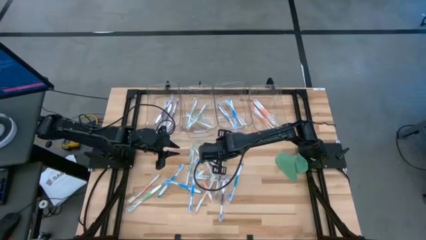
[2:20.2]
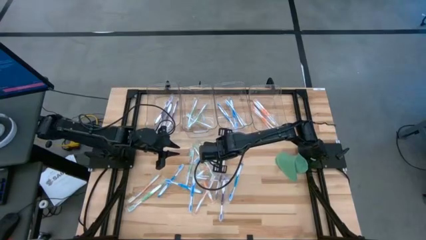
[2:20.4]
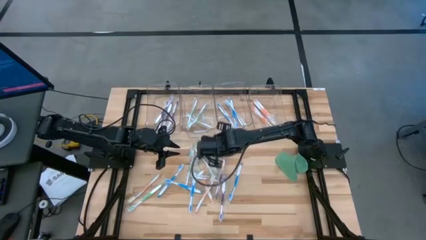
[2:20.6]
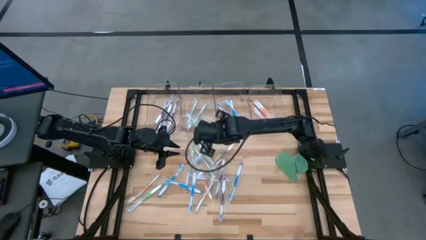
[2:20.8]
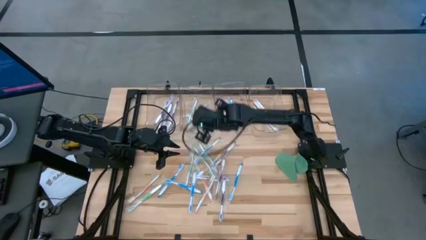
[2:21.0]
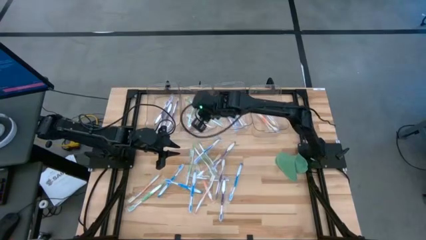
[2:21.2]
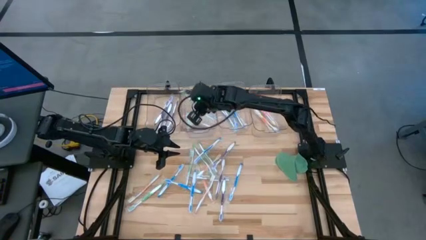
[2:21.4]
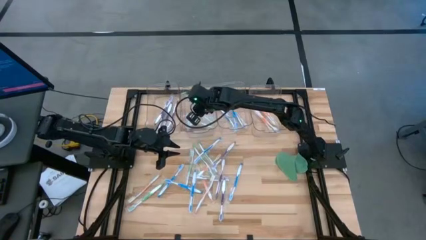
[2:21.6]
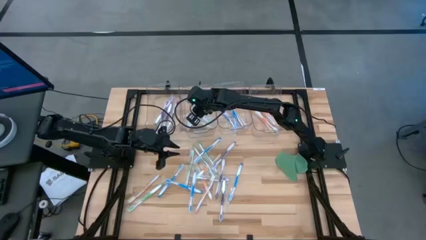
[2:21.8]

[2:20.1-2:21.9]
Task: Pick & Place Toothbrushes
Put the green toothbrush into the middle left transparent bin

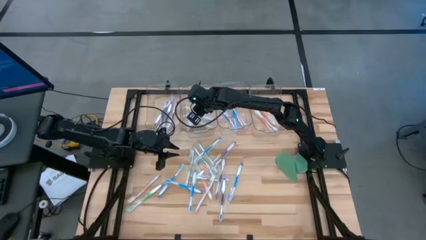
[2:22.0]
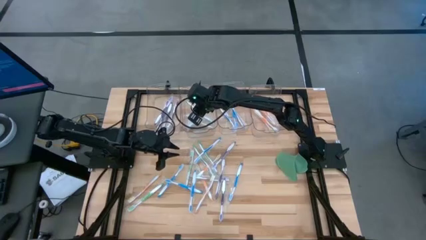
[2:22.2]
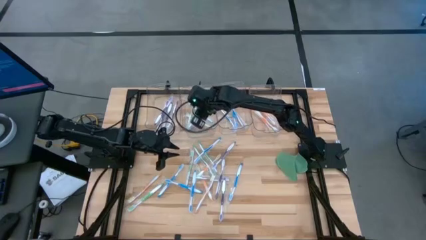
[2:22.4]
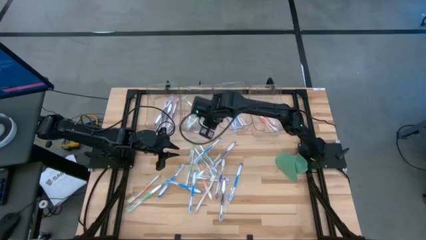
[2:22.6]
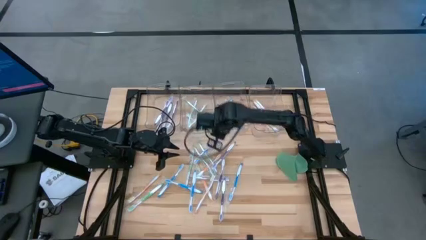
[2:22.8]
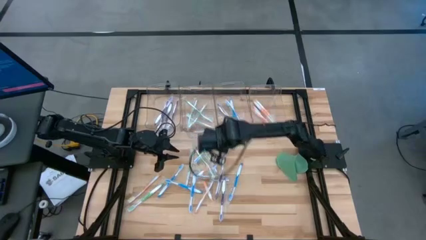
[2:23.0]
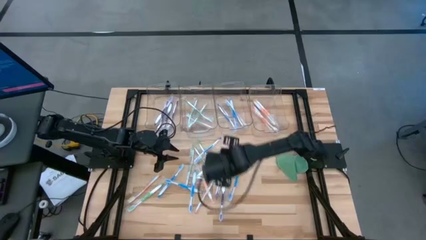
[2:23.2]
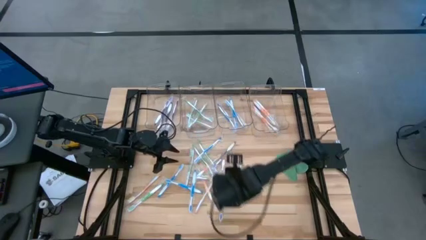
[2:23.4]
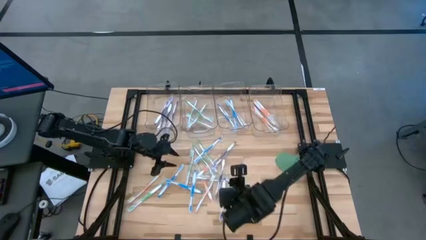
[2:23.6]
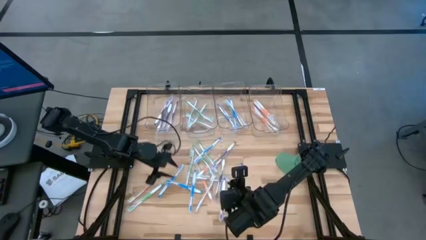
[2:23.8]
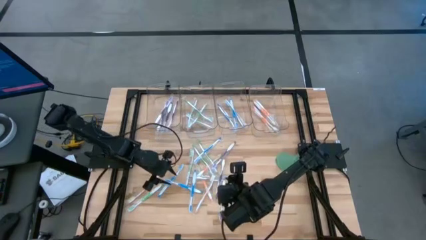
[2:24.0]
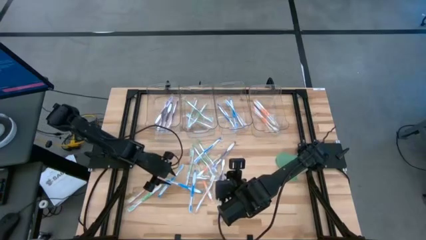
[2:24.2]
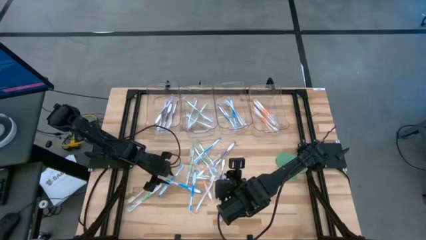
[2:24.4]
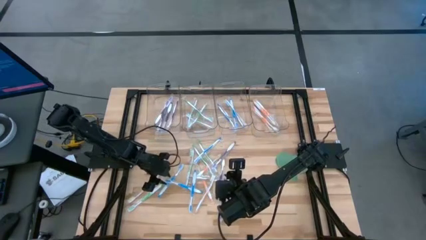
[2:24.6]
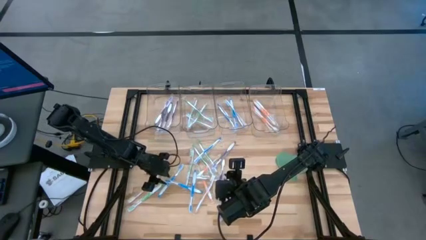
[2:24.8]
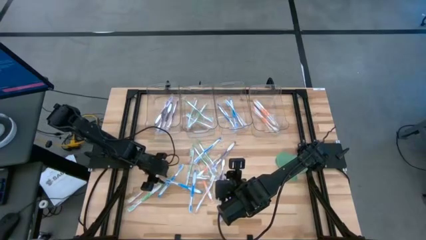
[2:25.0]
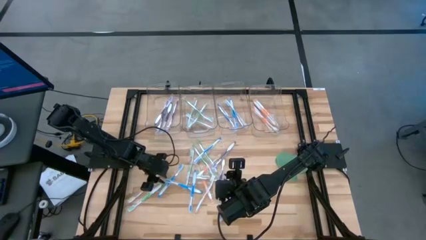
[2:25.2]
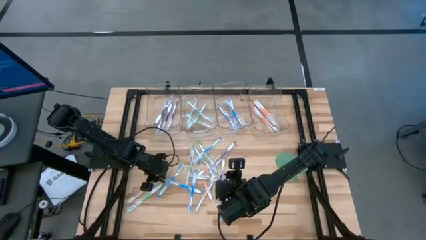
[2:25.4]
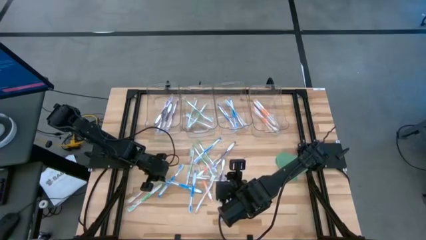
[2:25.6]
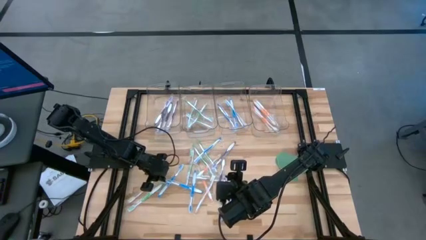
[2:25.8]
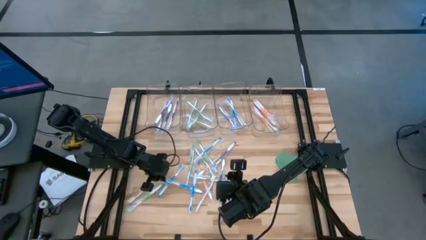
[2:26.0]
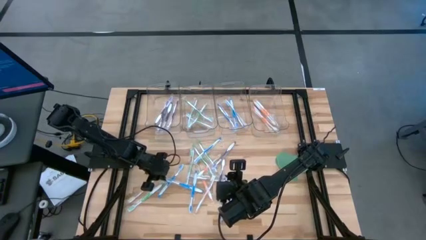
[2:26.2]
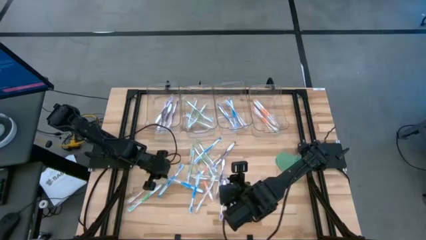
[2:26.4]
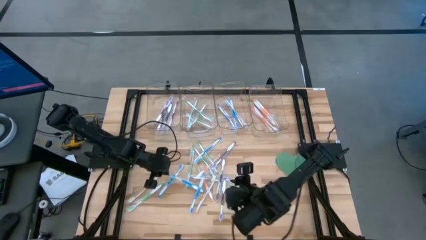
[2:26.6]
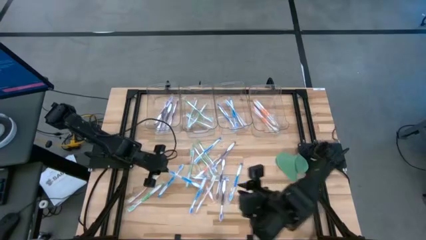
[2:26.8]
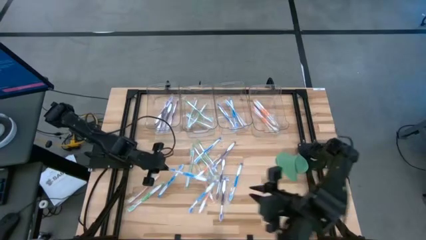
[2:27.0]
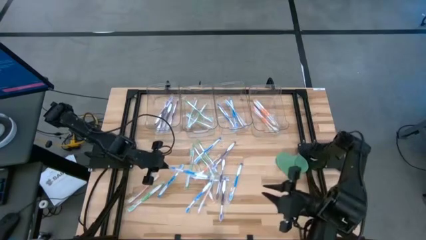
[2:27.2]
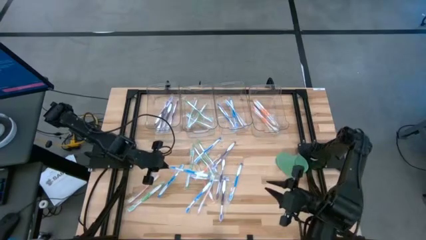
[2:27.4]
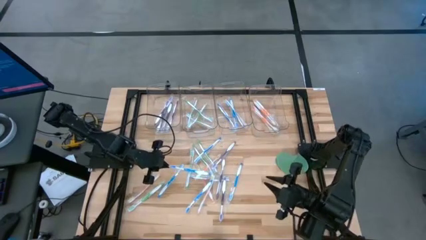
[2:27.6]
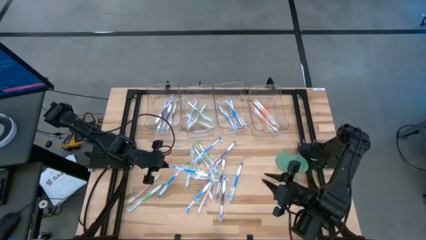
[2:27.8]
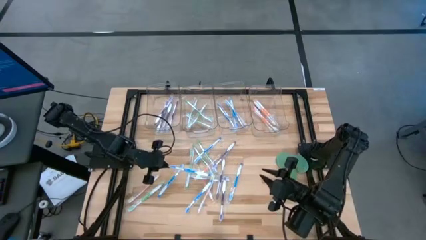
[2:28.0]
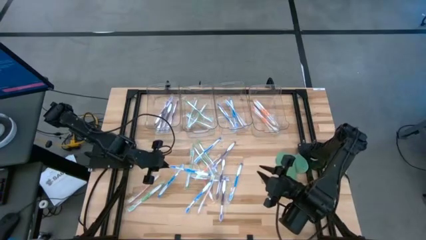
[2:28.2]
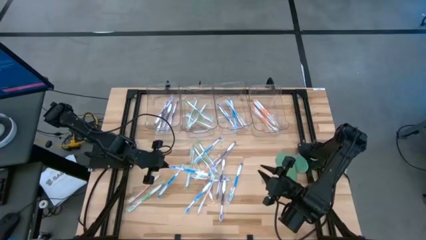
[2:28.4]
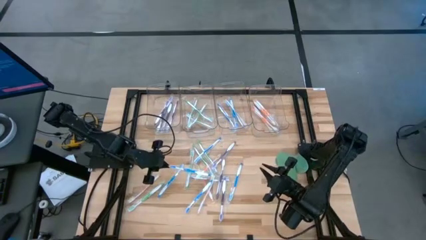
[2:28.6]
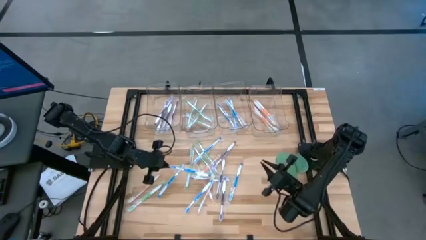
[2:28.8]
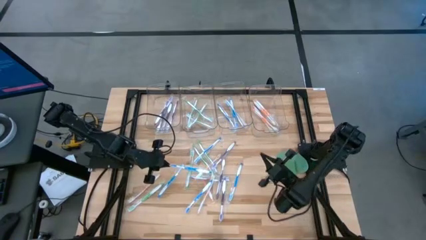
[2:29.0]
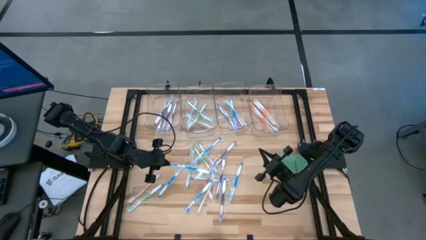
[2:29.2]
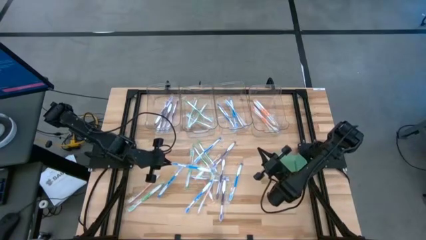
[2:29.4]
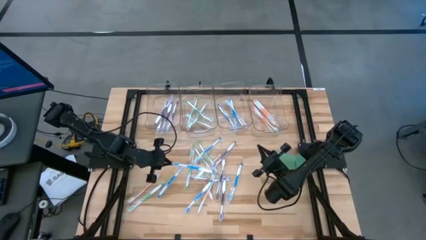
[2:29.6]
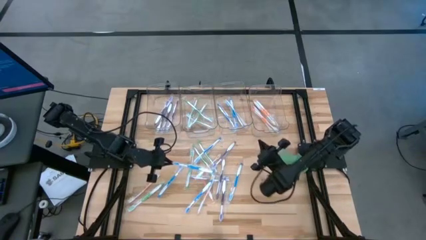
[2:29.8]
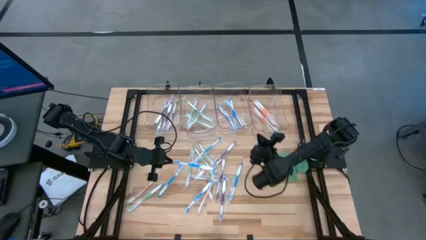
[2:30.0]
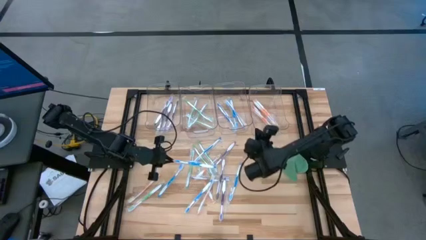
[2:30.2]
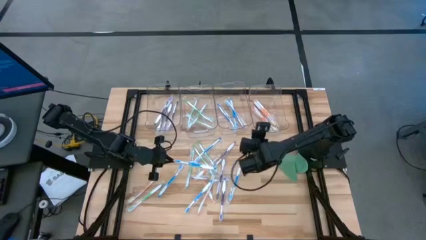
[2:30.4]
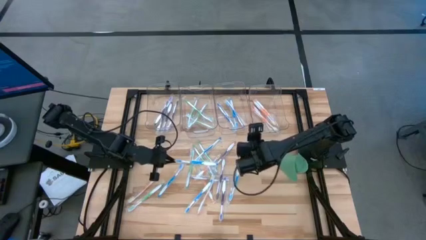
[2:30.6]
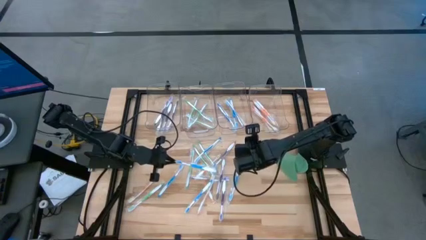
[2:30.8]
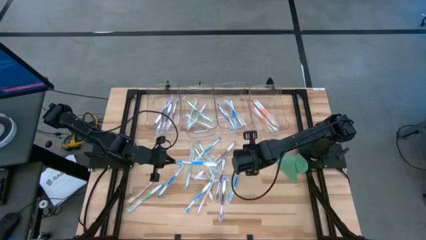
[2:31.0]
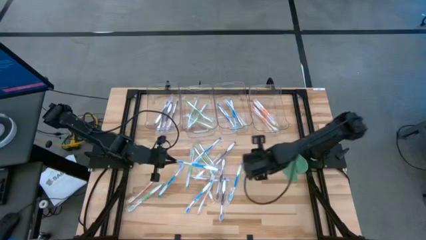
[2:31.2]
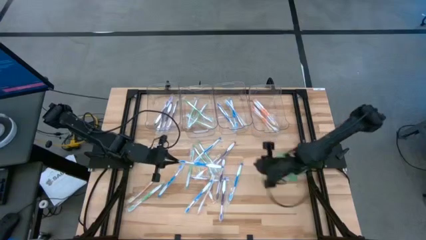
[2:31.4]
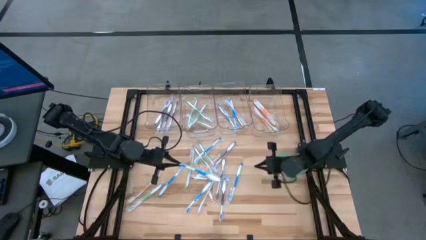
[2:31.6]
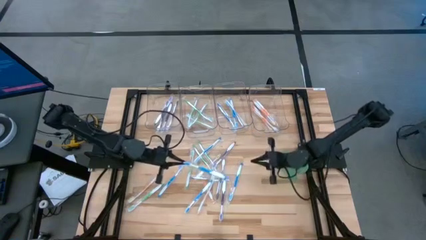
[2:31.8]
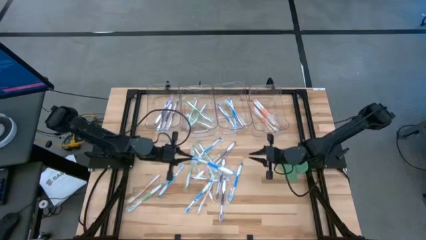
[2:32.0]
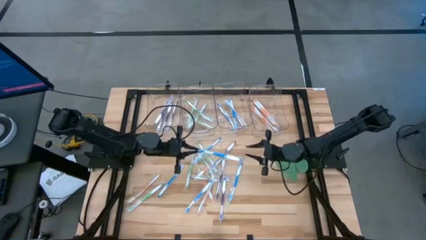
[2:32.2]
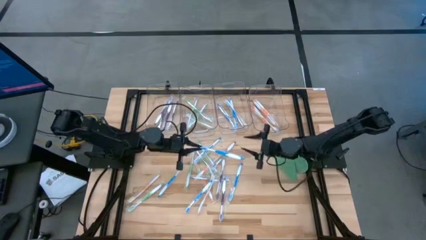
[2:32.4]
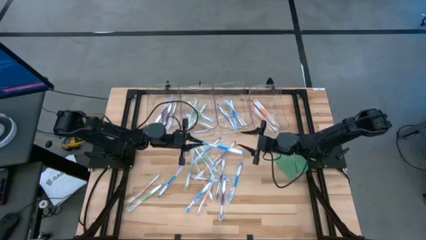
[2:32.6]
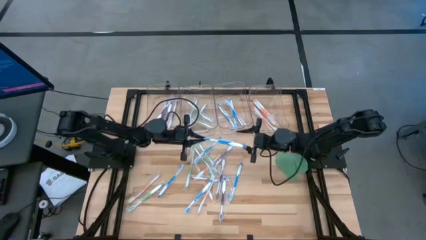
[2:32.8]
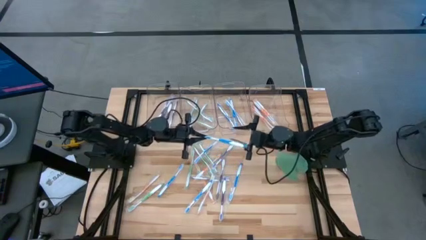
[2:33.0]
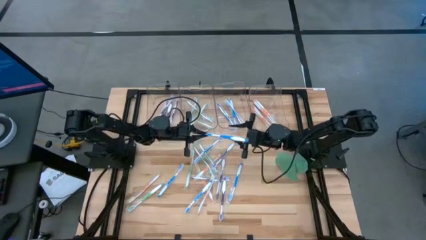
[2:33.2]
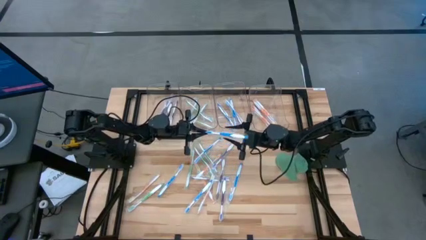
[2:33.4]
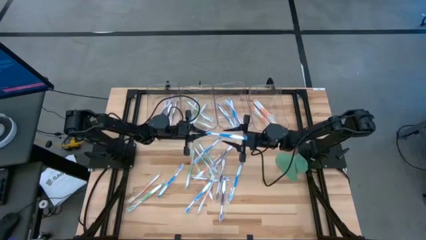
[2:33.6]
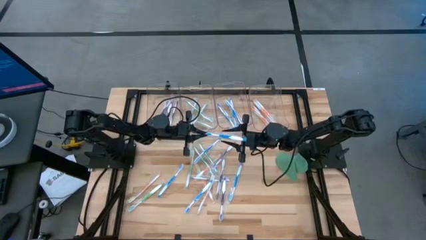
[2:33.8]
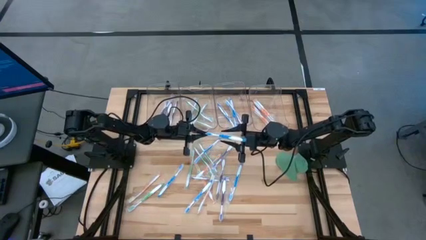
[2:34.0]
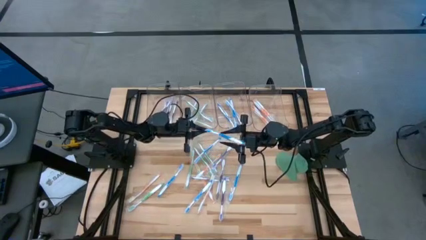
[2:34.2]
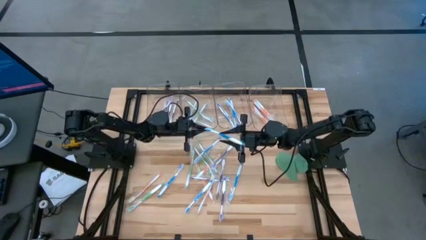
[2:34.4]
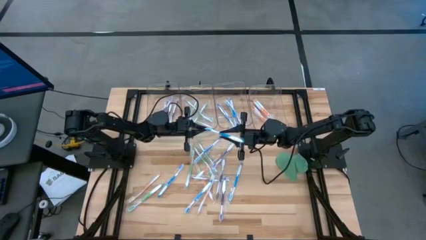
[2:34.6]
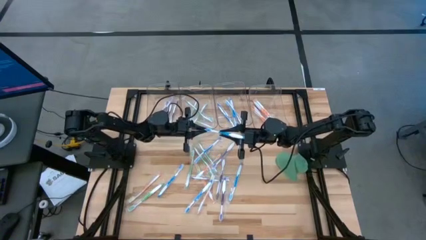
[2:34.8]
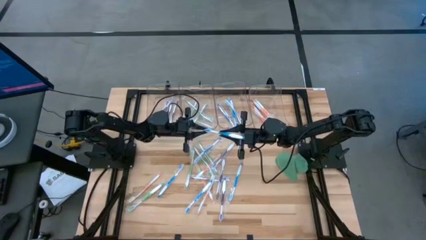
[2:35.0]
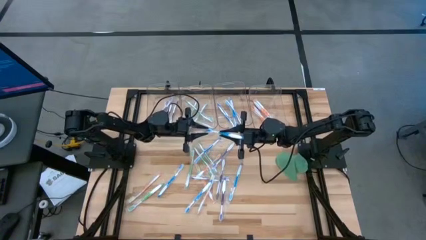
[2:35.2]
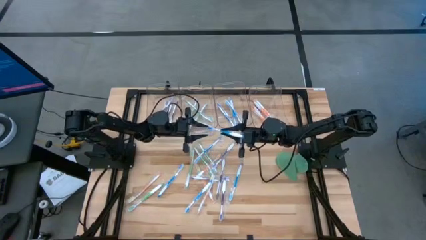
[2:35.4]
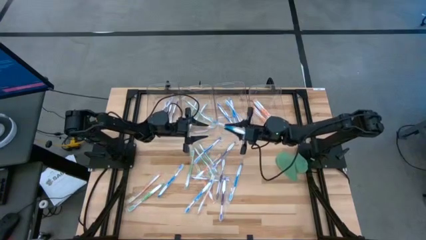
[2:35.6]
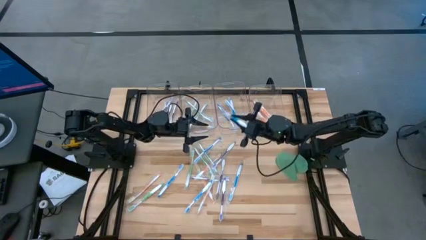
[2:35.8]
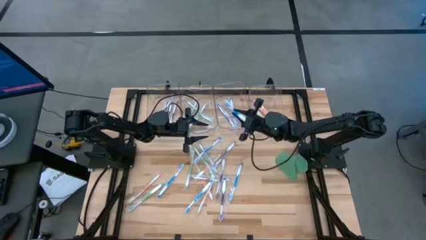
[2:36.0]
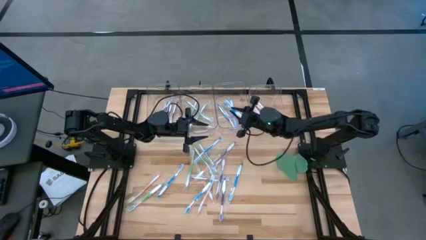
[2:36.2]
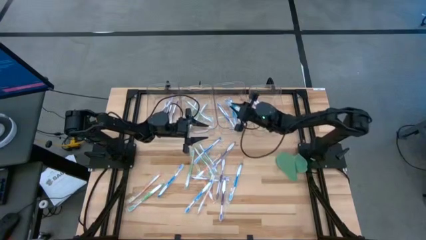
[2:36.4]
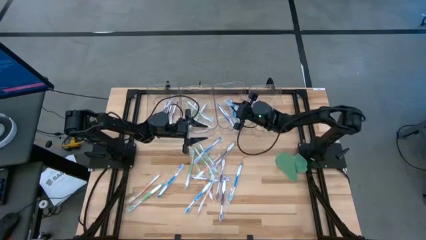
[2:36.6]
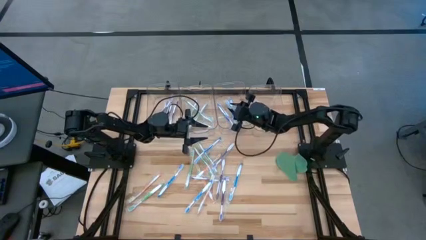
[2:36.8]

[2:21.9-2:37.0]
Put the blue toothbrush into the middle right transparent bin
